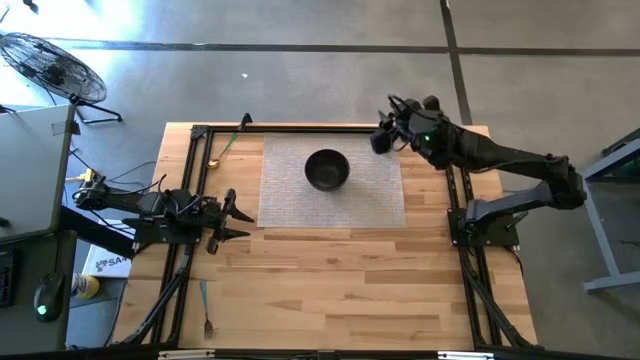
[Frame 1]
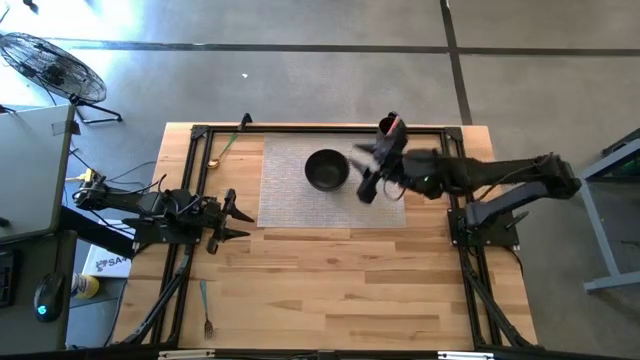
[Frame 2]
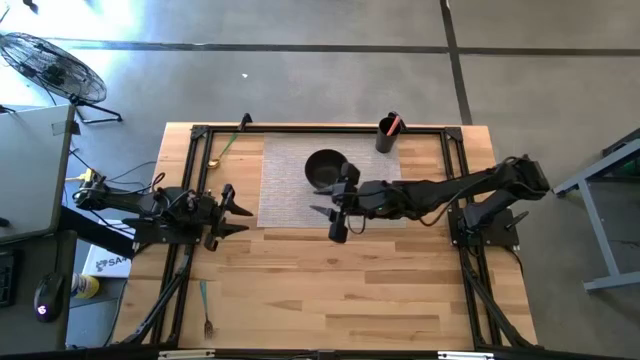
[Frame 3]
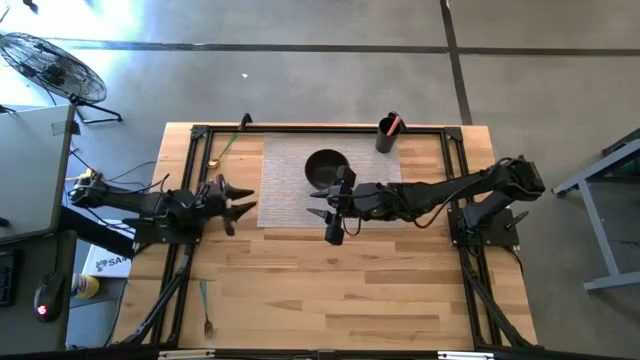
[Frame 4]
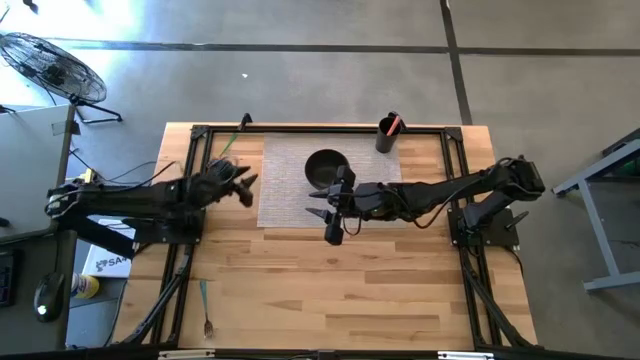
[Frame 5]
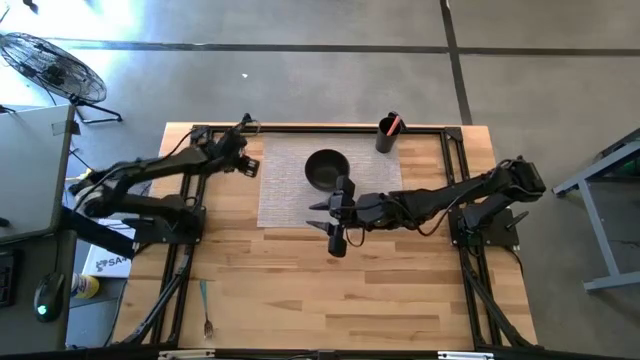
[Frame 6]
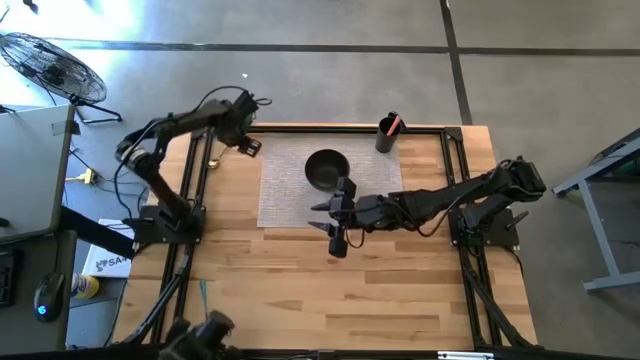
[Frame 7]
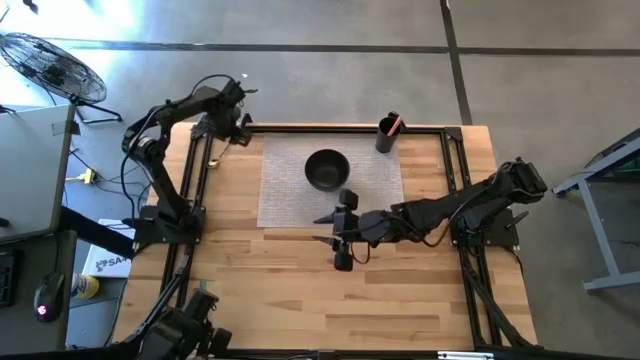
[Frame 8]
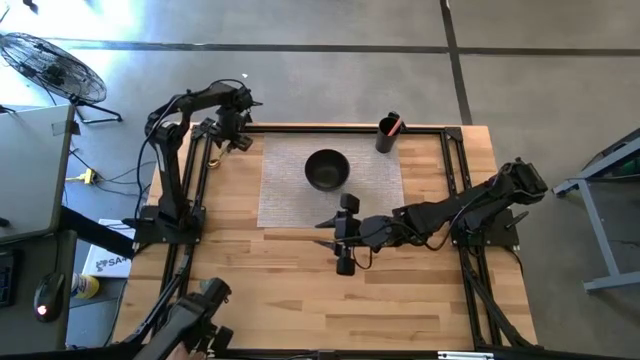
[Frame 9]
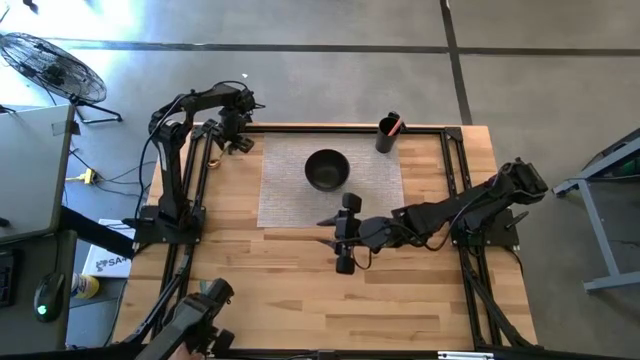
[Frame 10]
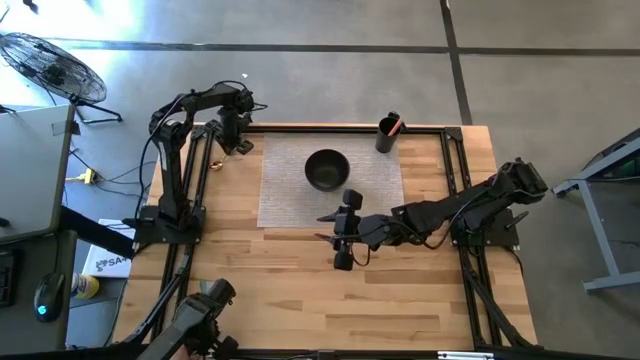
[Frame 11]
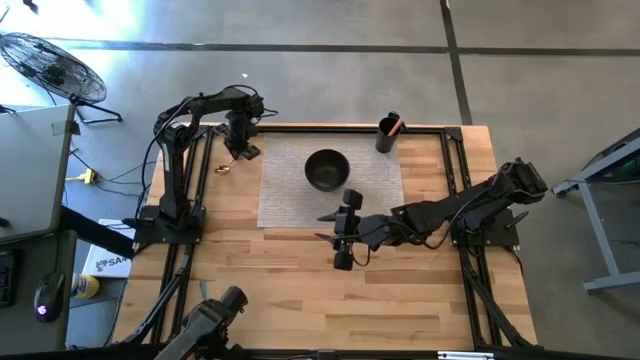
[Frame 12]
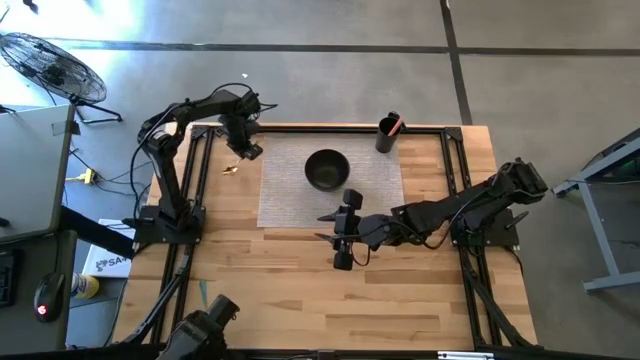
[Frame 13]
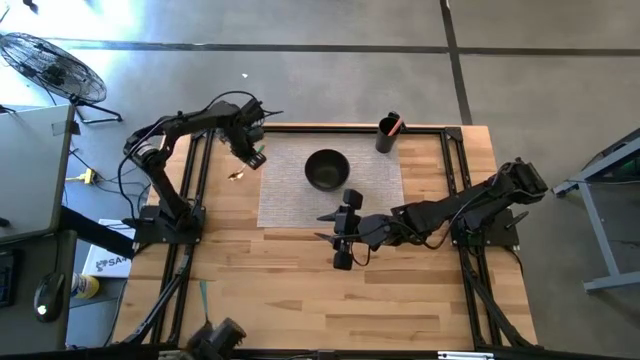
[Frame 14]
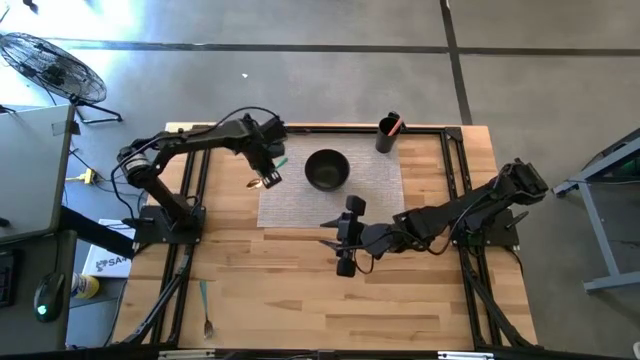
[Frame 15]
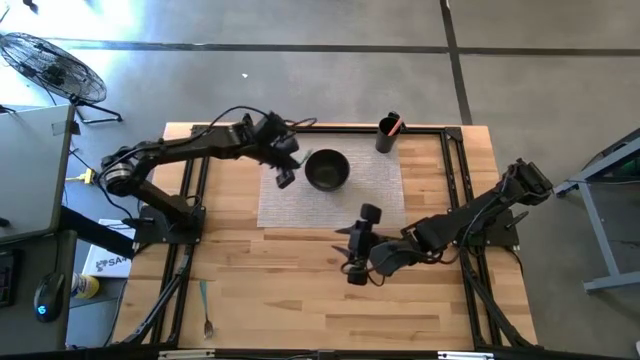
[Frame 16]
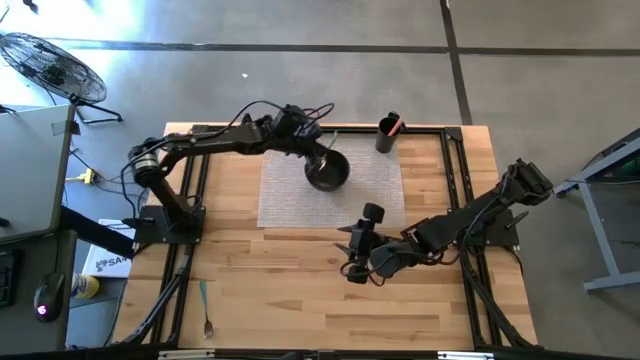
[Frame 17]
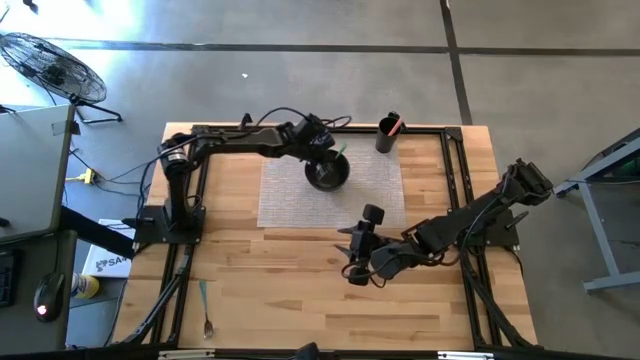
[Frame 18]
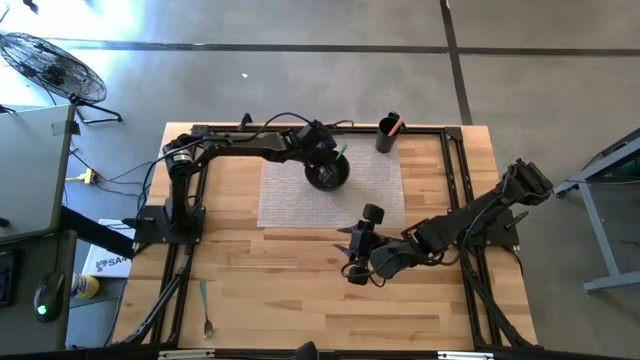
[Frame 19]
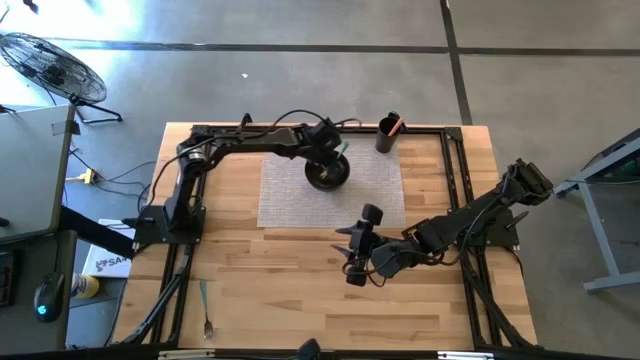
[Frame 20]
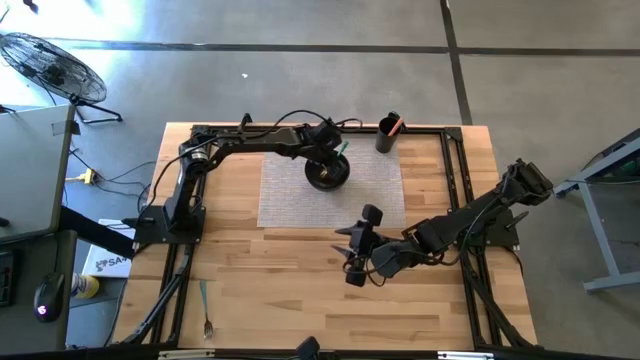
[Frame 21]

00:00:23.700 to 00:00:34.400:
Task: Pick & Place Utensil
Put the green spoon into the black bowl

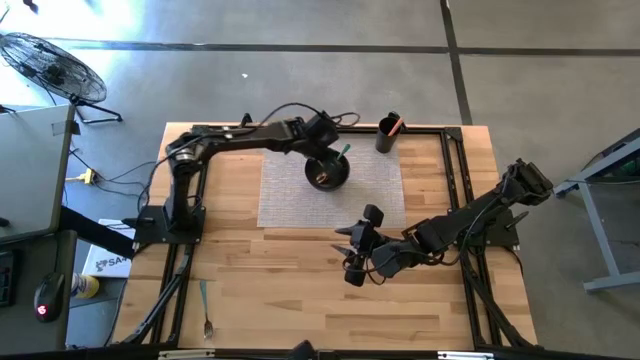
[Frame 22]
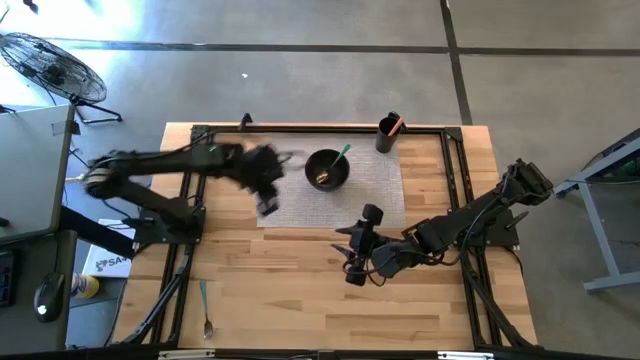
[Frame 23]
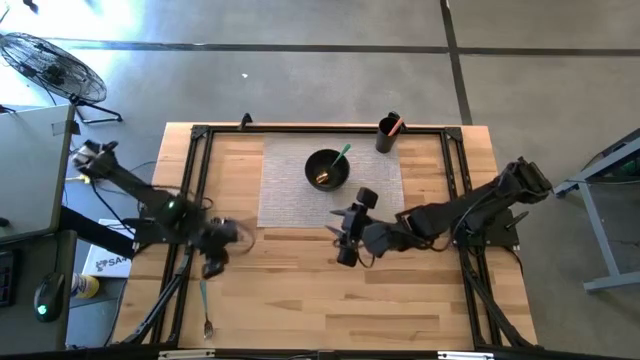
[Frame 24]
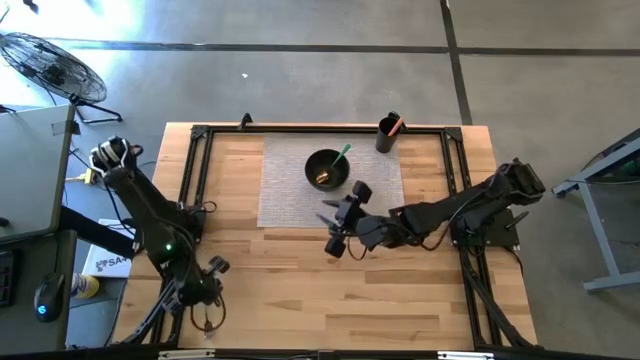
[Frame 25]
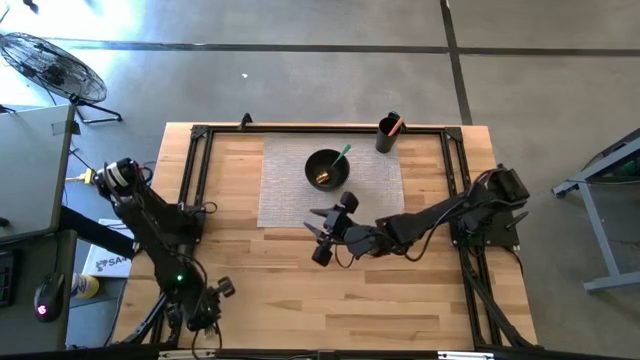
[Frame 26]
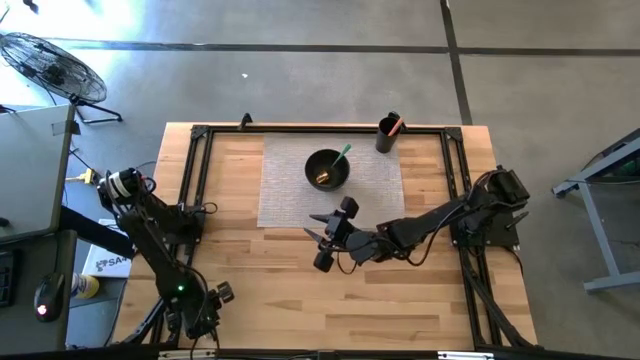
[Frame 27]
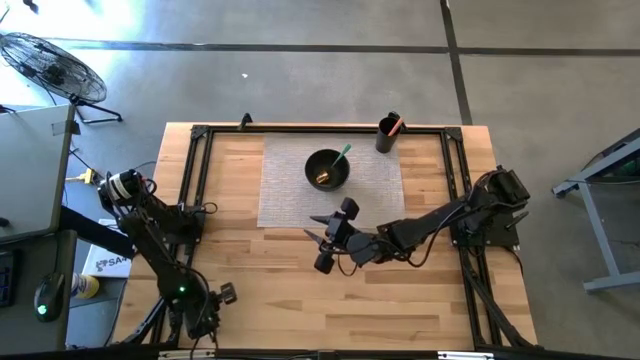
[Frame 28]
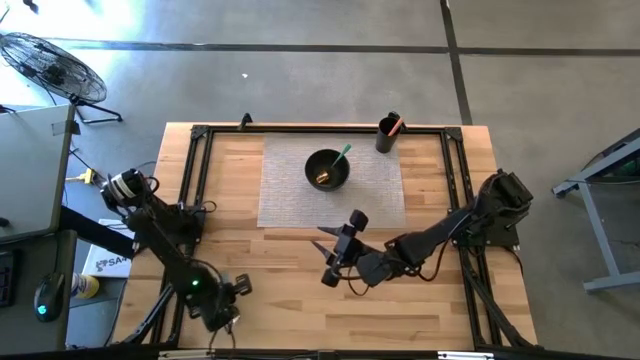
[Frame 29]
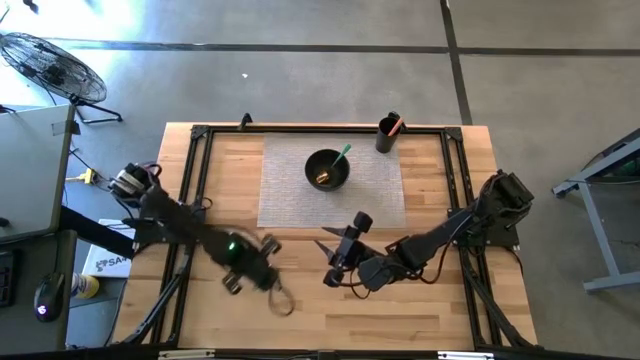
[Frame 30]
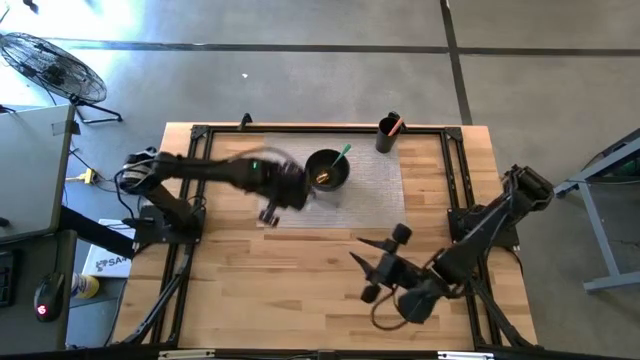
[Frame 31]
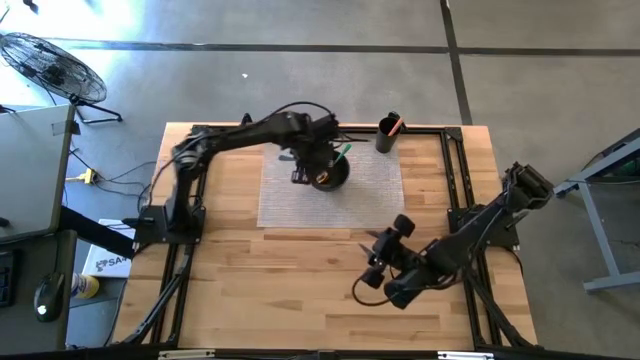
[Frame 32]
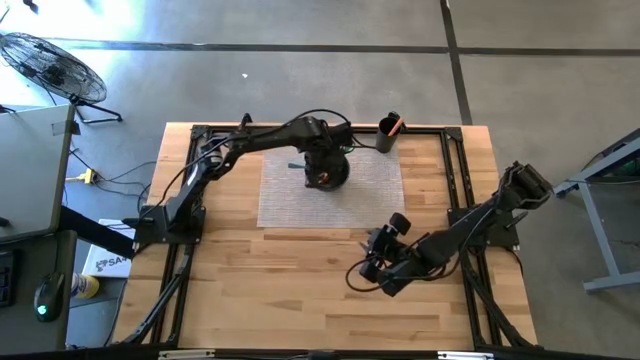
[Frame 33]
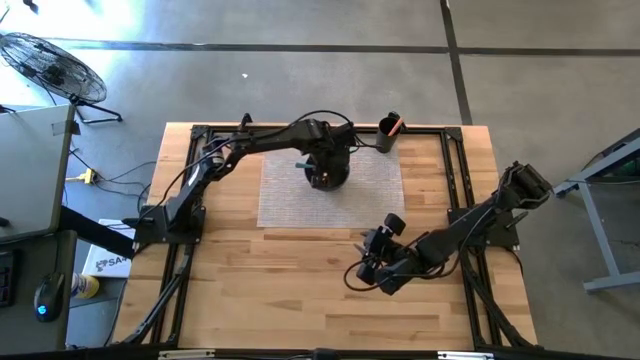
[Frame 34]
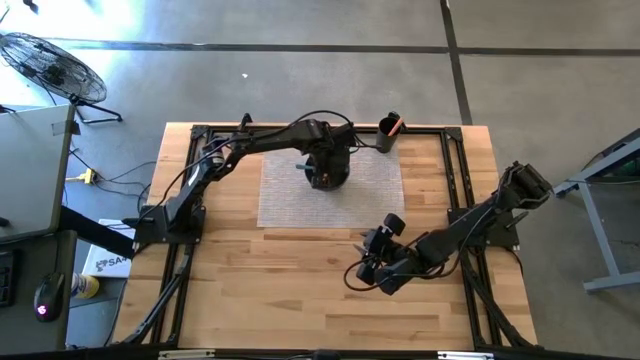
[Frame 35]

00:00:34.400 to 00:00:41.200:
Put the green fork into the black bowl

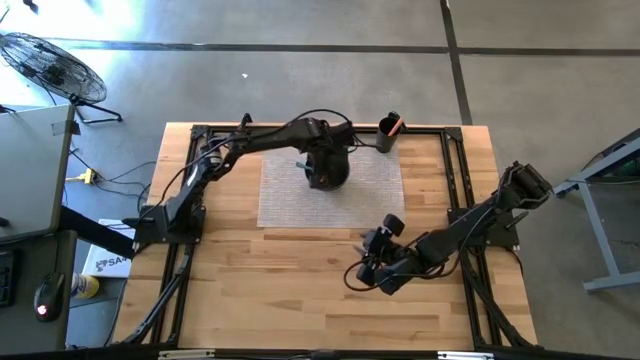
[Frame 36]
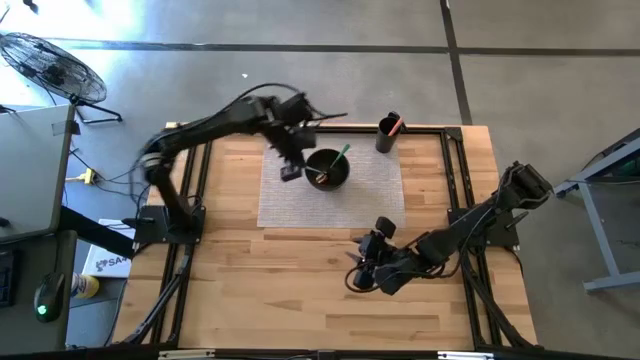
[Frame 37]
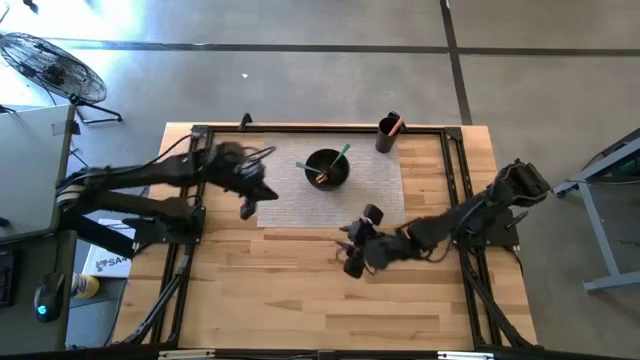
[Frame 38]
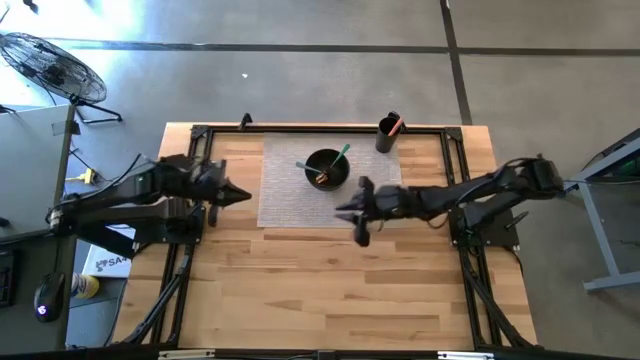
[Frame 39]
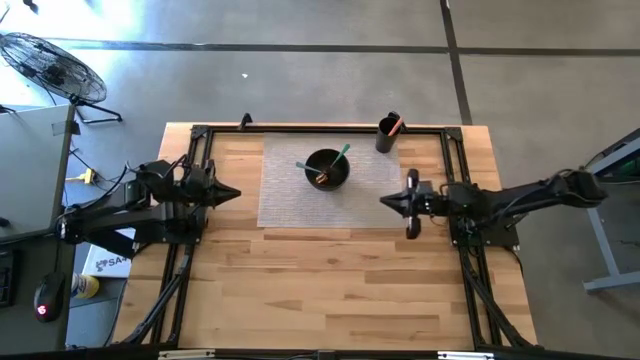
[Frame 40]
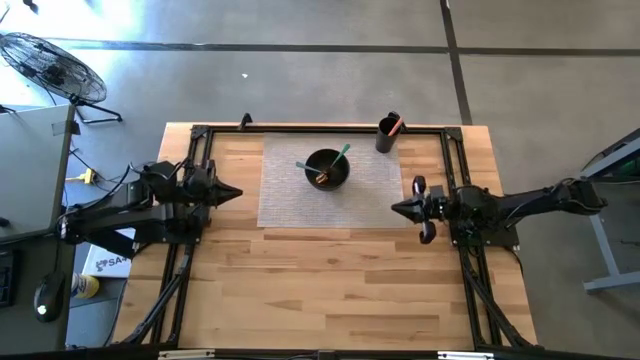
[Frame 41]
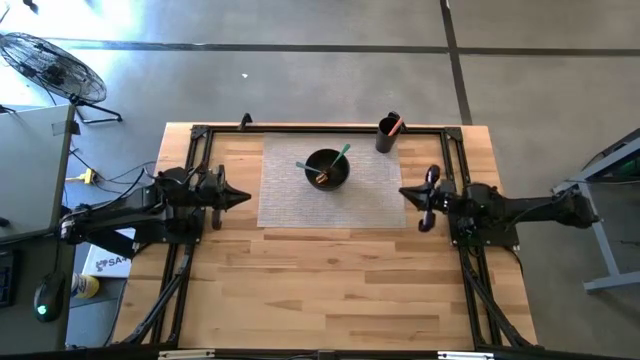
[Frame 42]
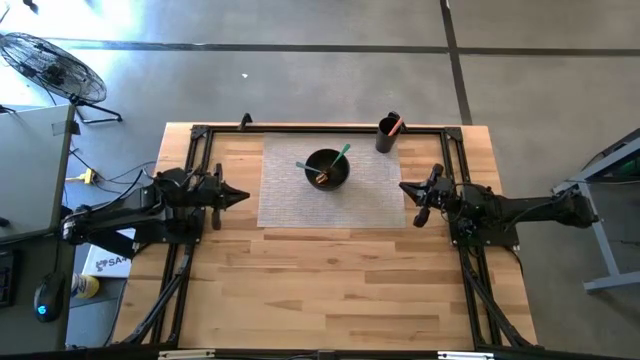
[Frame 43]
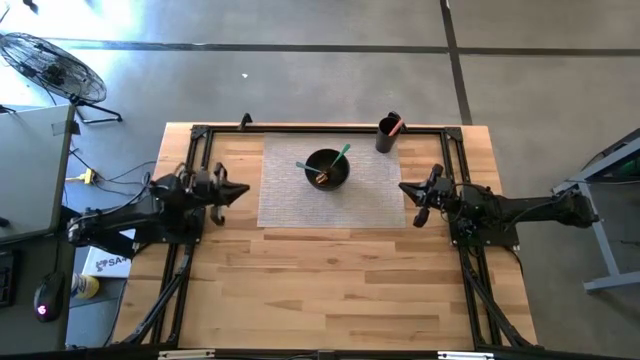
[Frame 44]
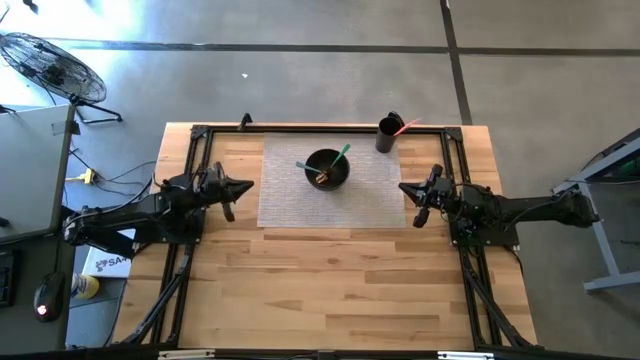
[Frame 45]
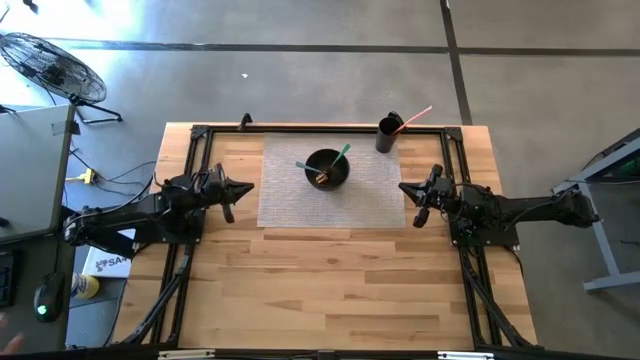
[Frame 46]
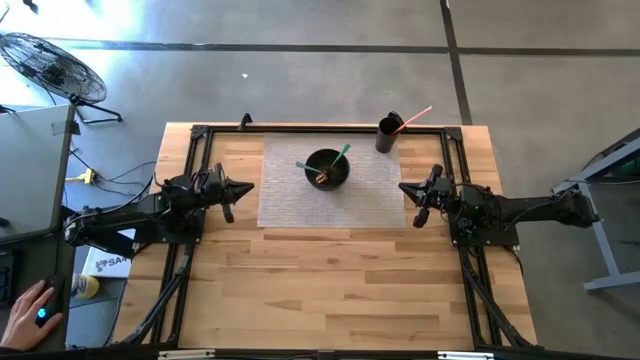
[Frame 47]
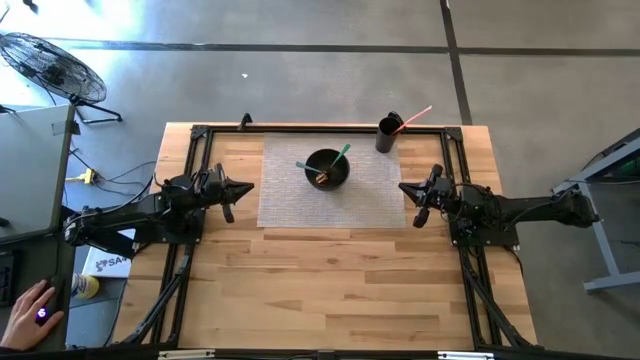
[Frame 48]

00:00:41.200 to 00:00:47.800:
Return to Home Position
